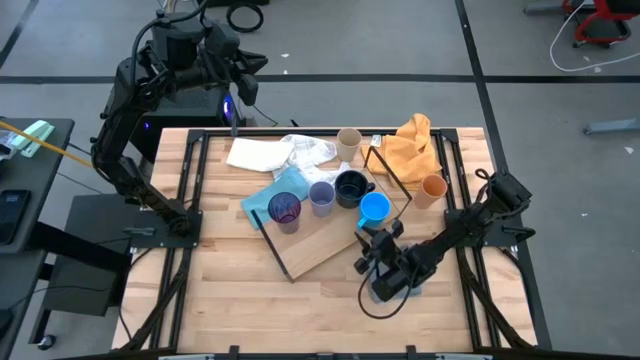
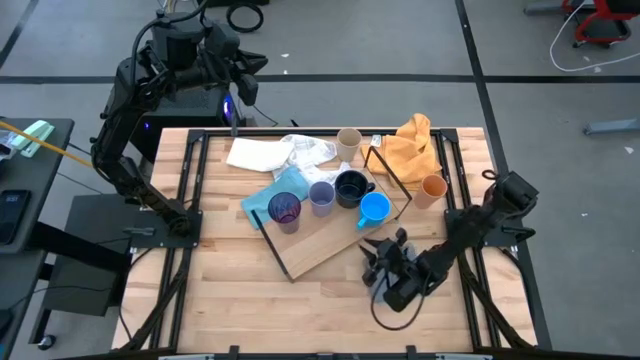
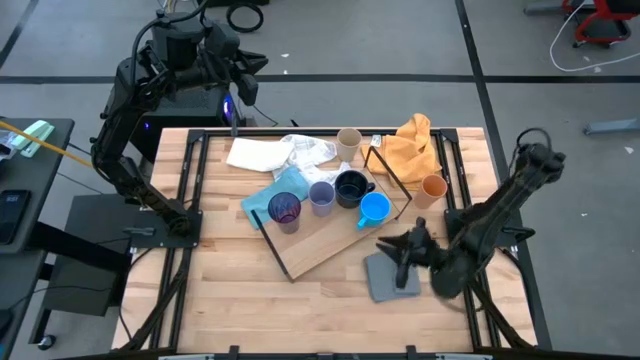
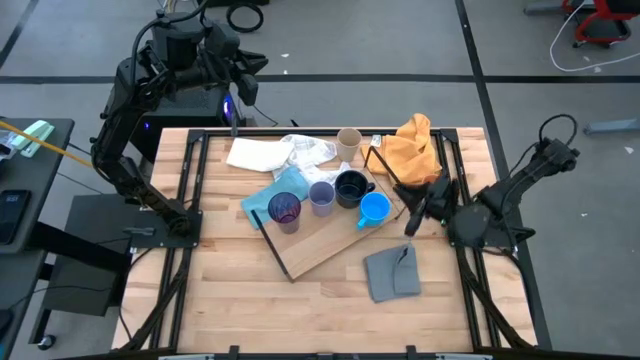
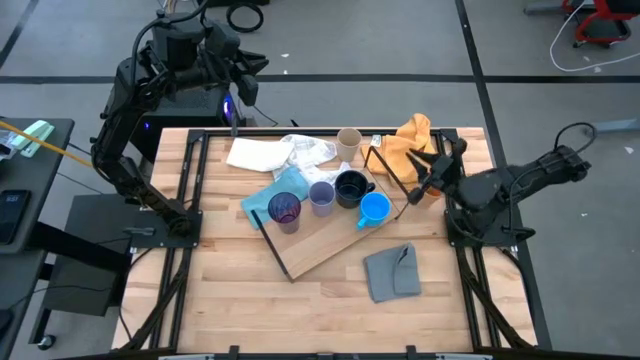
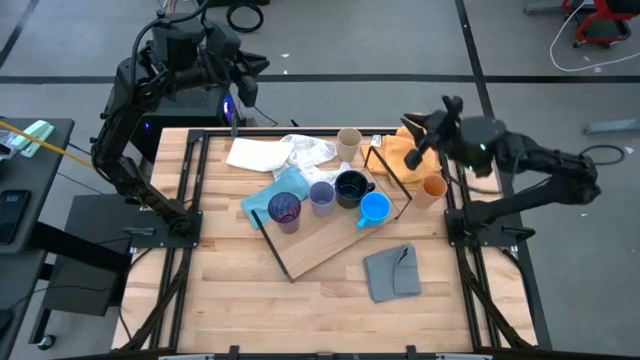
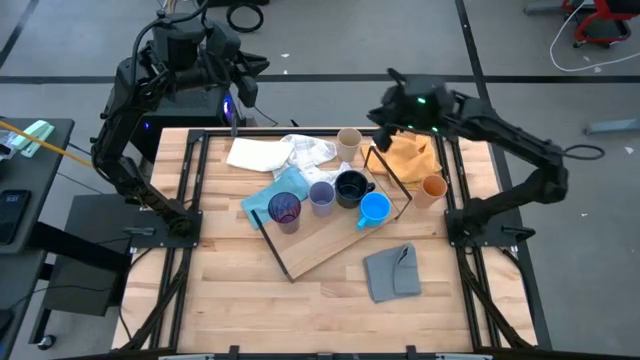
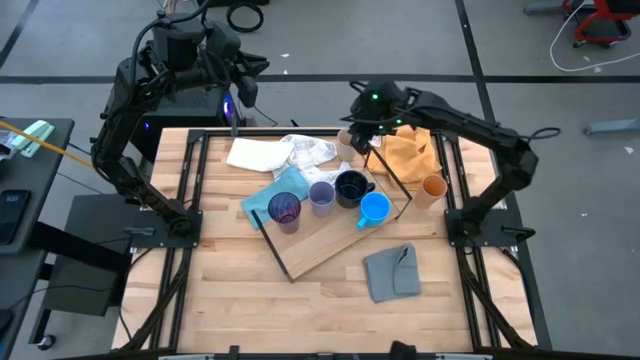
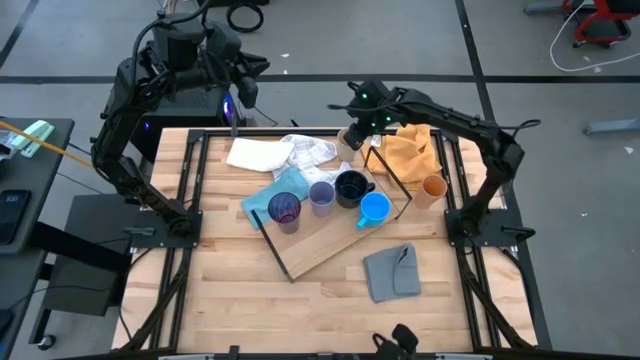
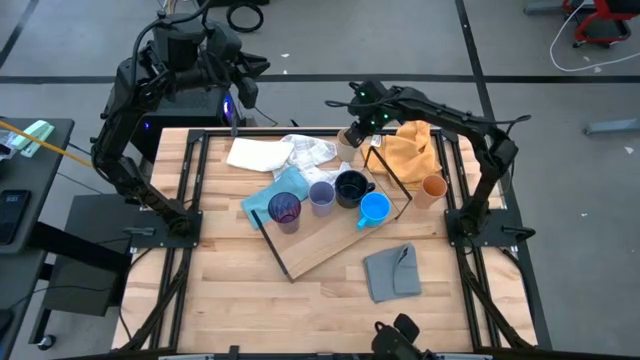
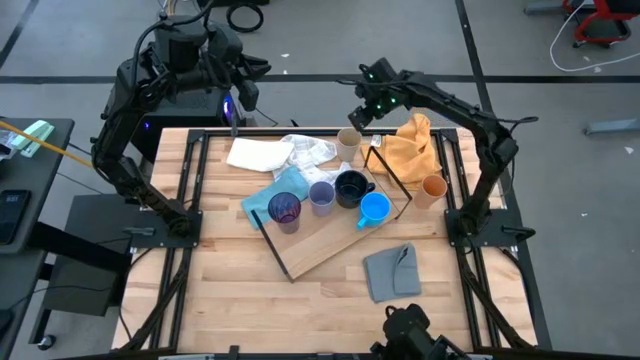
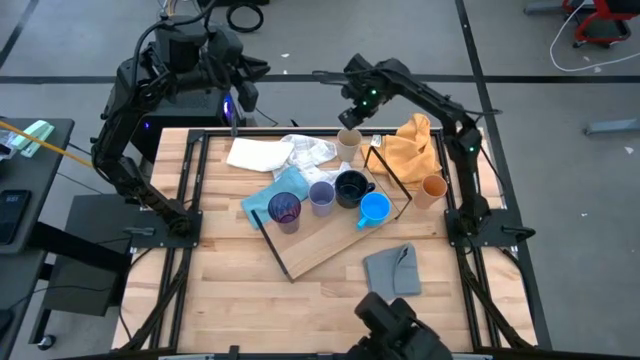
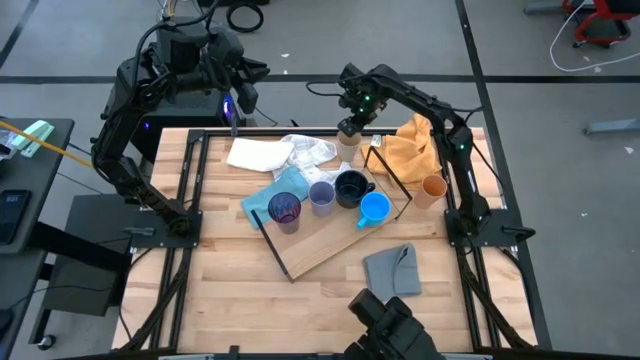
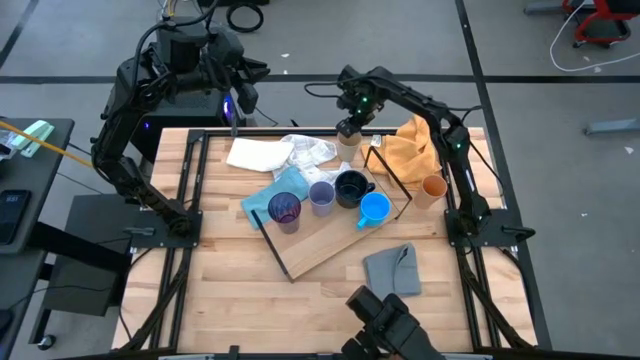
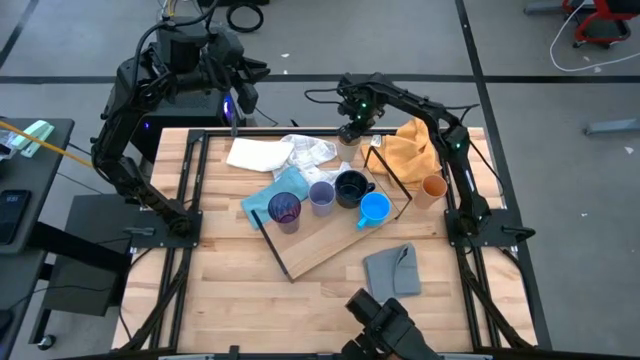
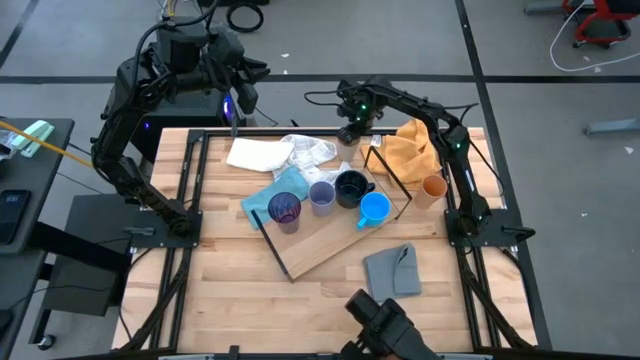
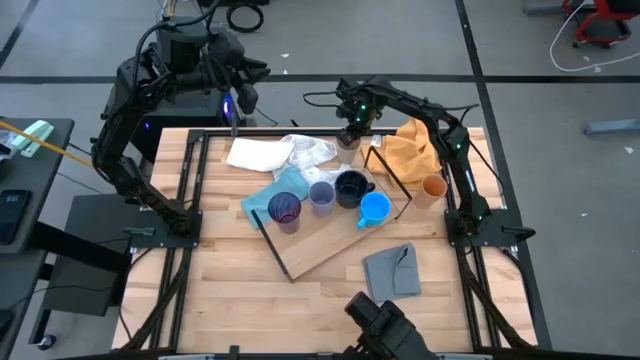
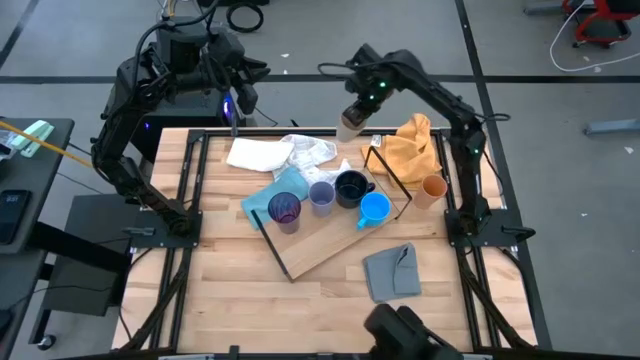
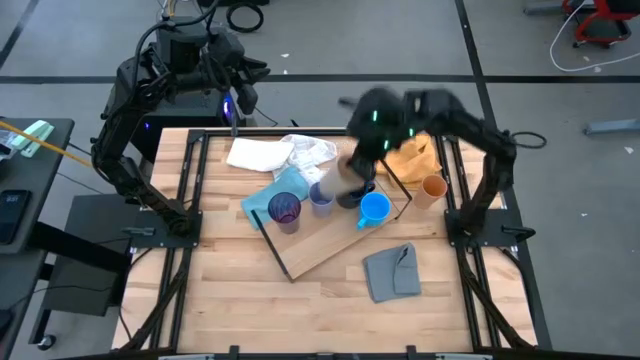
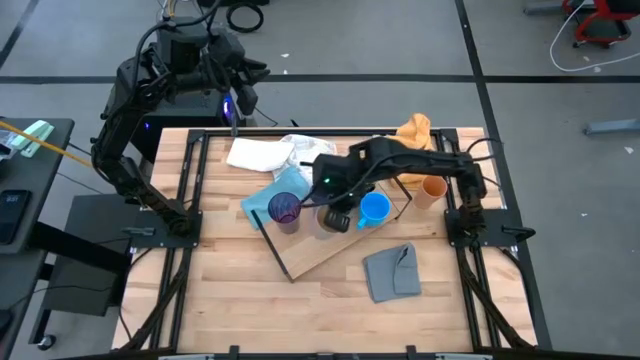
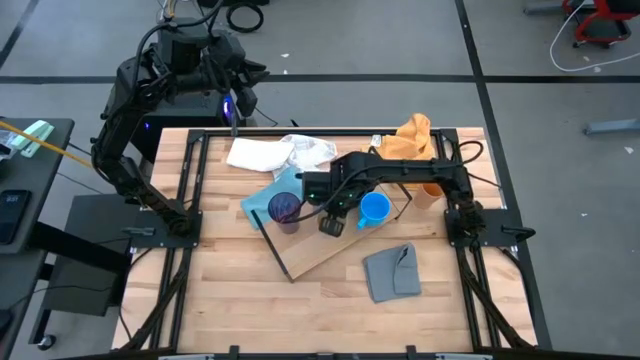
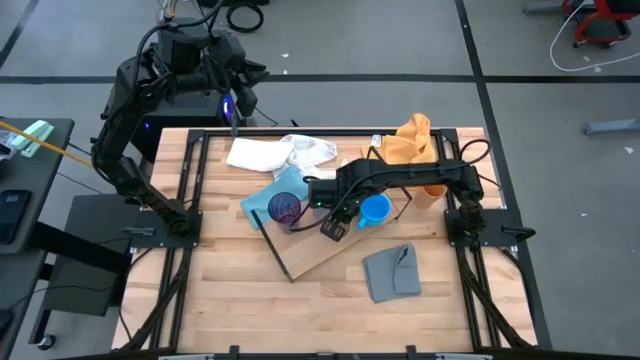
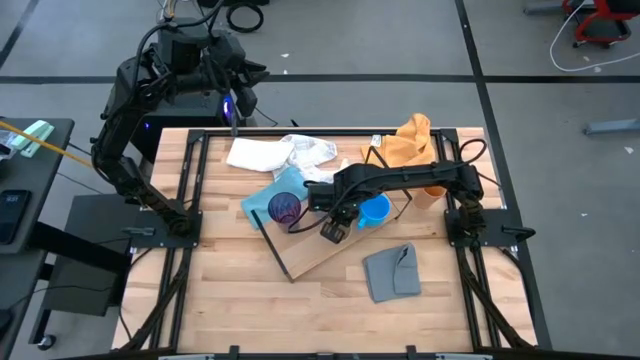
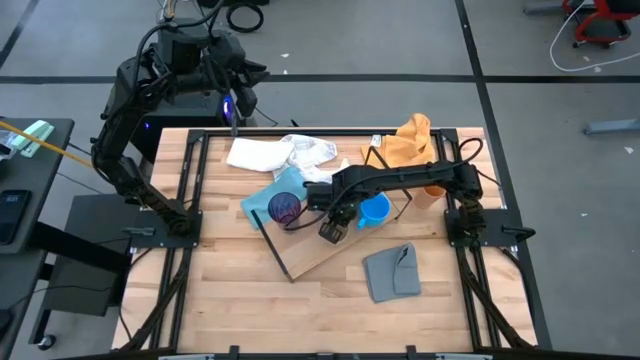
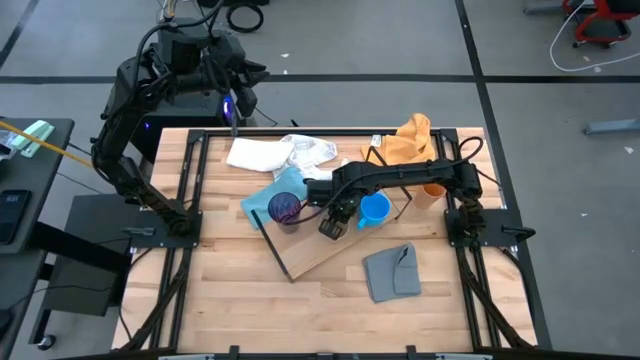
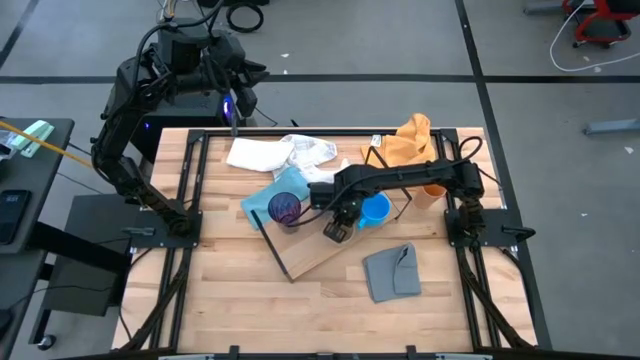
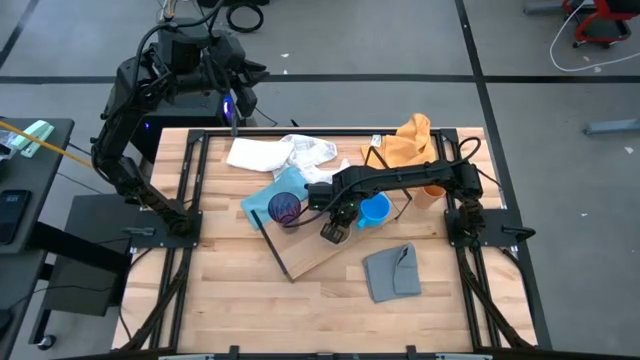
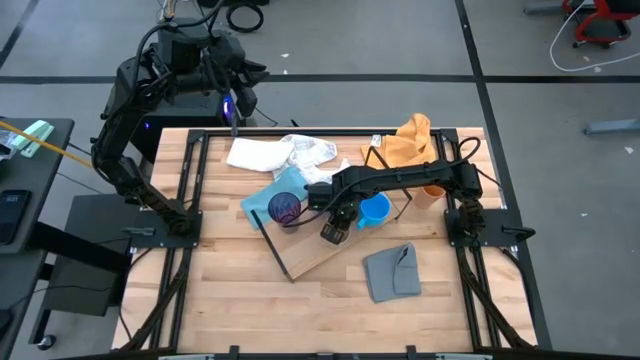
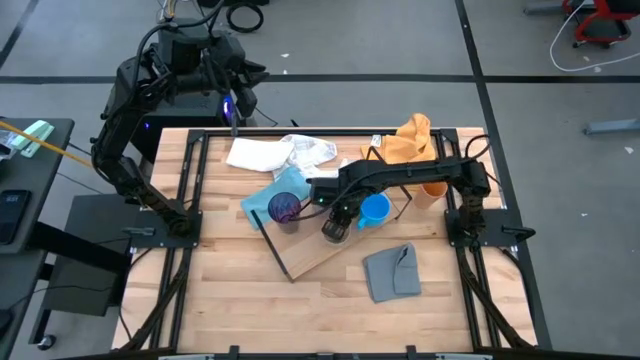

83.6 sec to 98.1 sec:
Task: Stack small to large cups/mugs on shelf
Put the light brown cup on the shelf

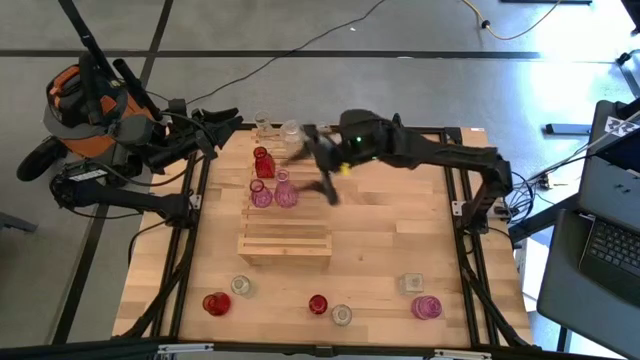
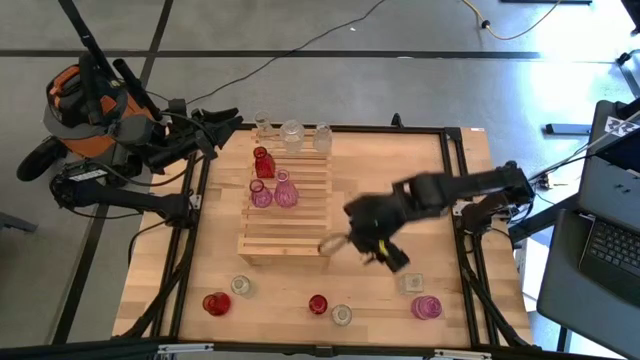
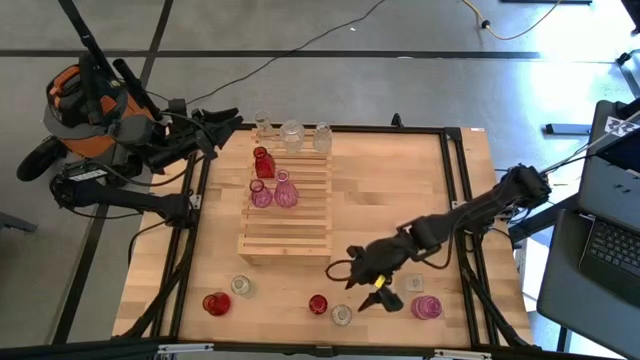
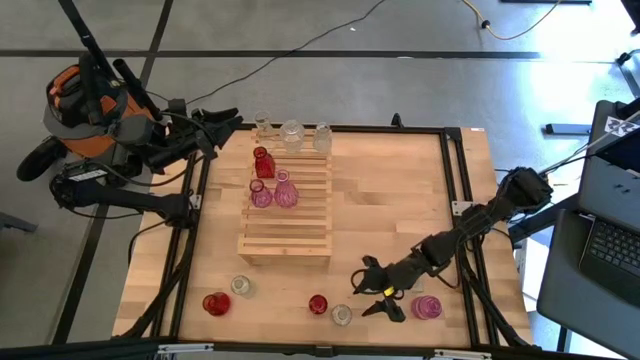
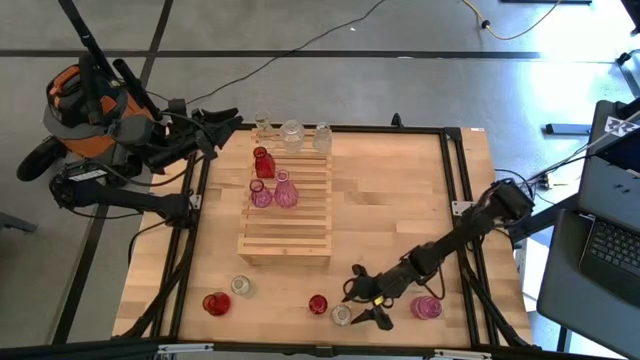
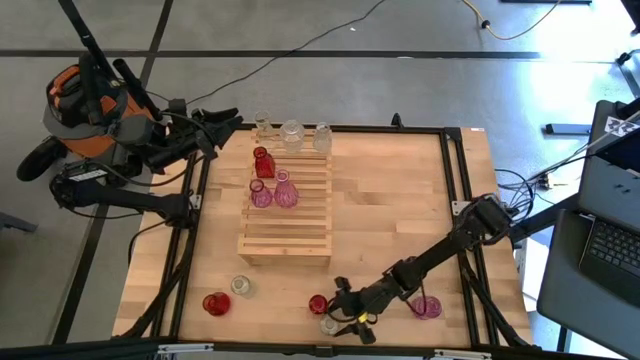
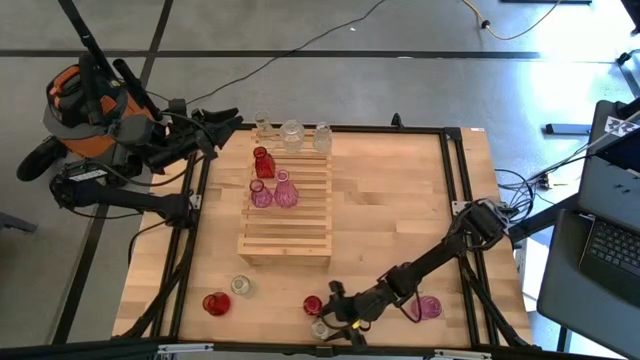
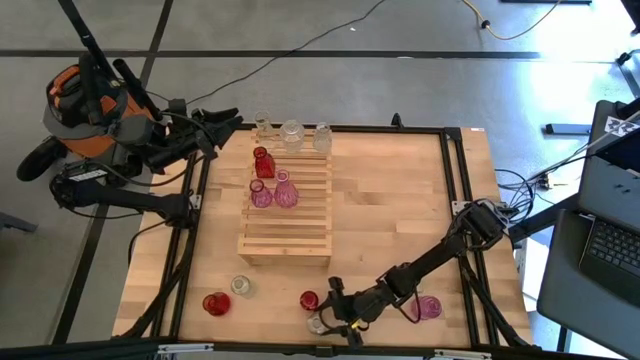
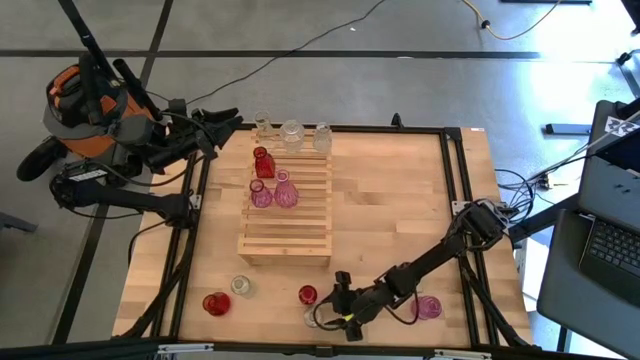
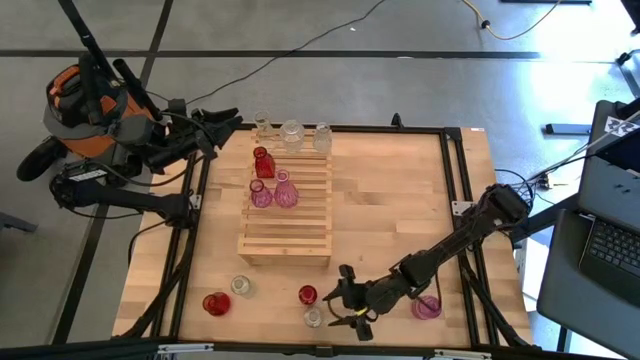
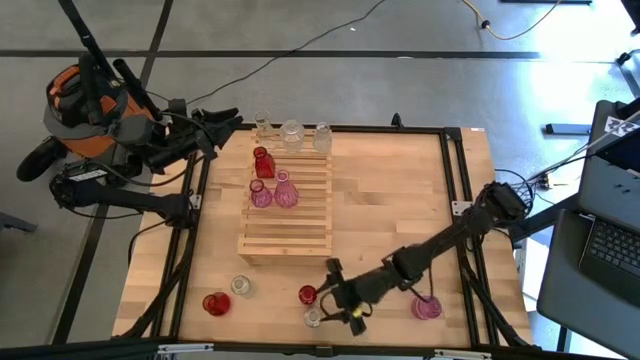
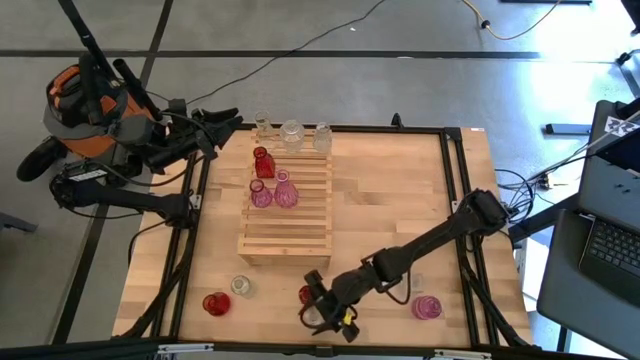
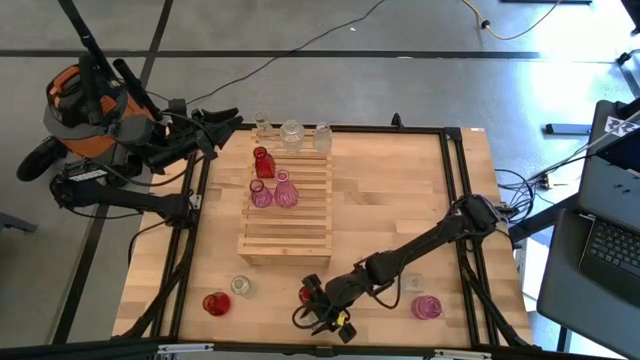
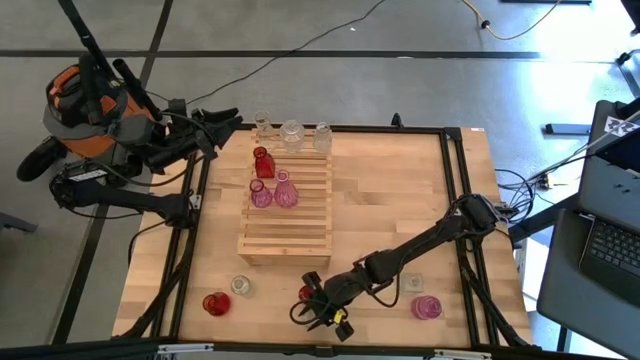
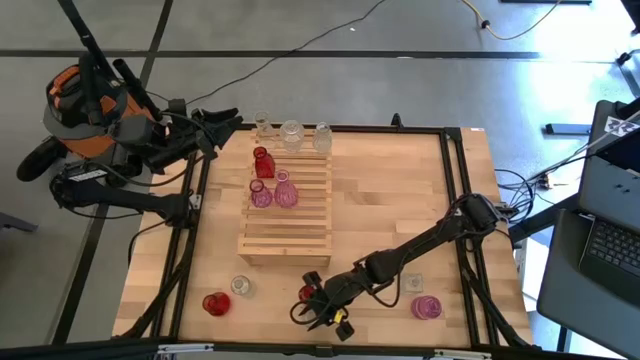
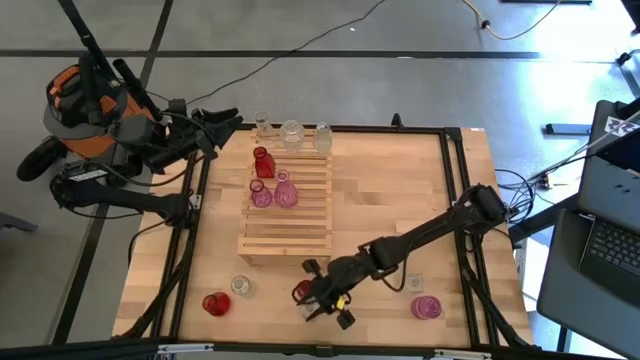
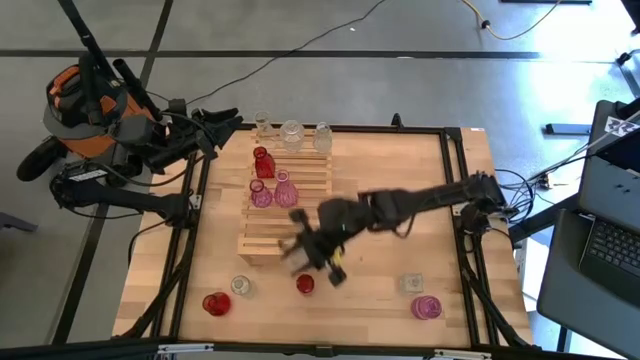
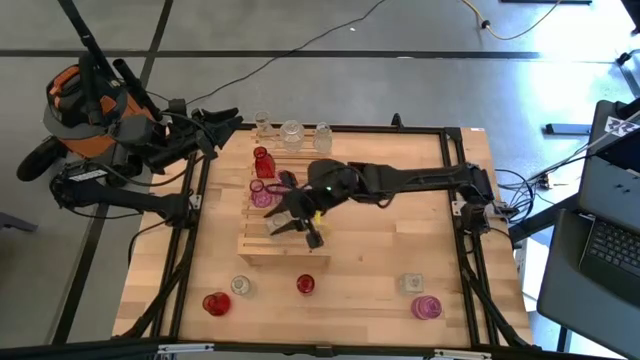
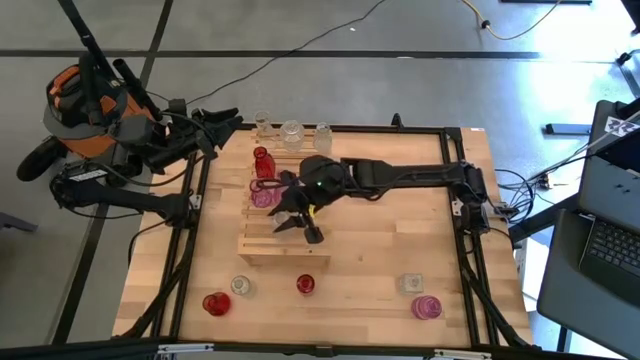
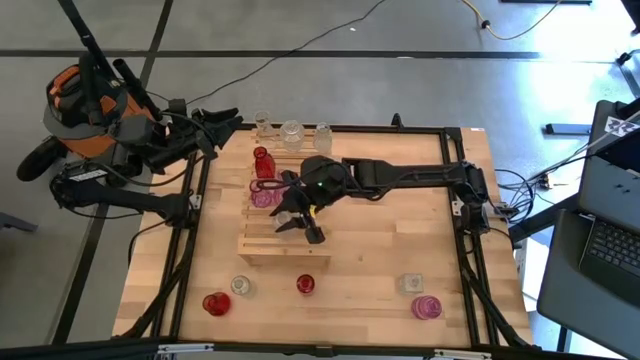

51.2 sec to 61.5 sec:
Task: sort vases onto shelf
Put the transparent vase on the shelf
